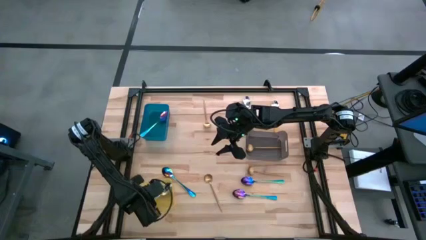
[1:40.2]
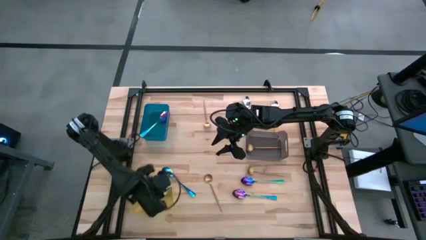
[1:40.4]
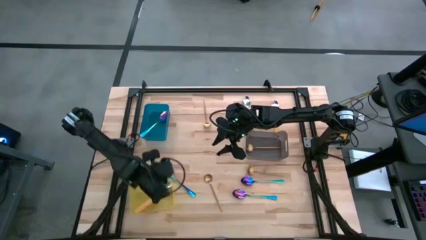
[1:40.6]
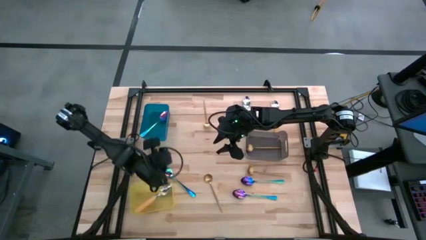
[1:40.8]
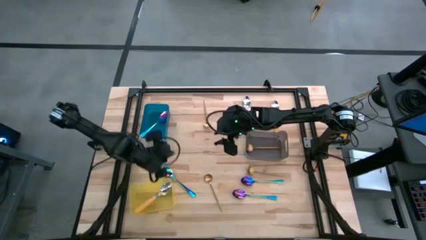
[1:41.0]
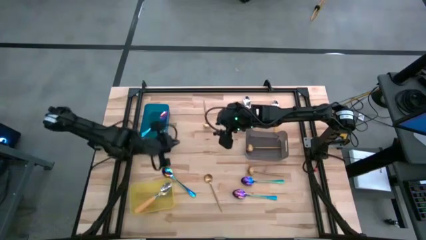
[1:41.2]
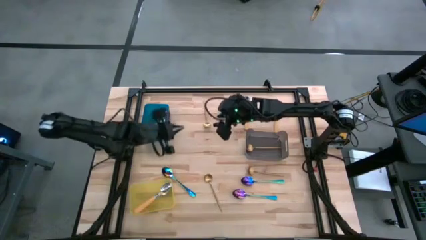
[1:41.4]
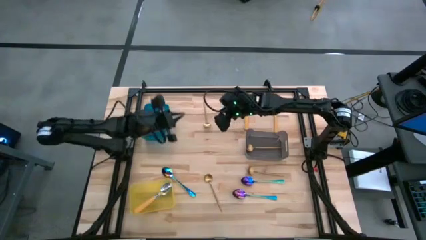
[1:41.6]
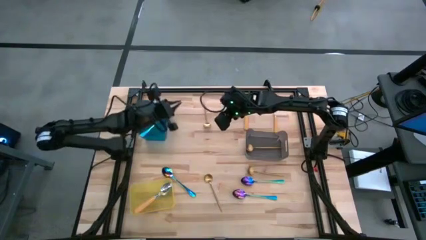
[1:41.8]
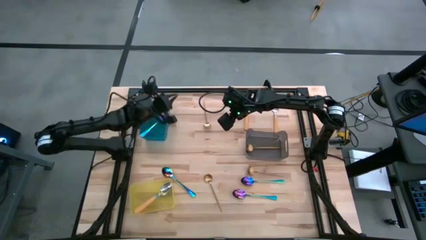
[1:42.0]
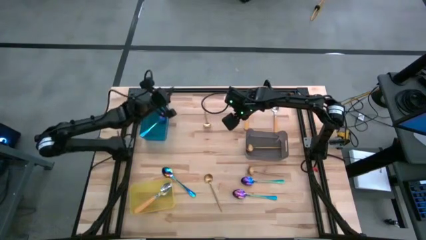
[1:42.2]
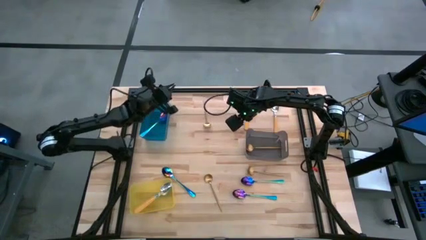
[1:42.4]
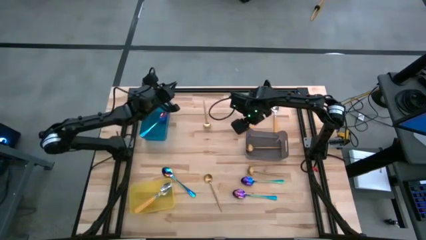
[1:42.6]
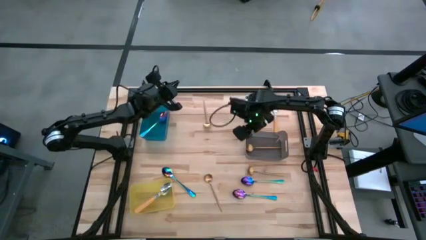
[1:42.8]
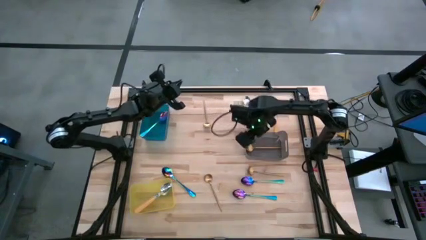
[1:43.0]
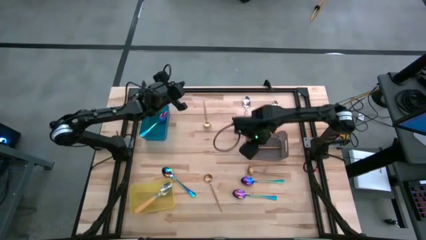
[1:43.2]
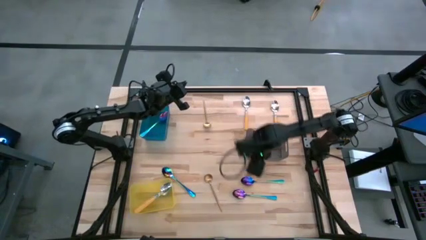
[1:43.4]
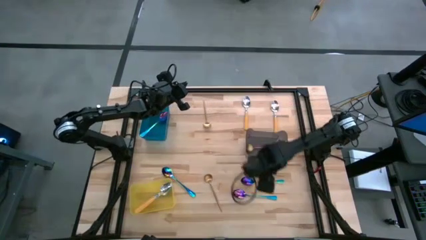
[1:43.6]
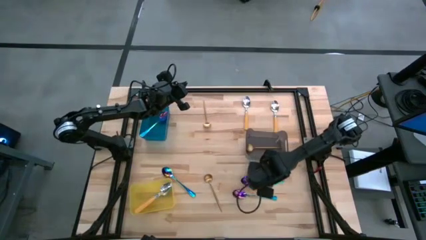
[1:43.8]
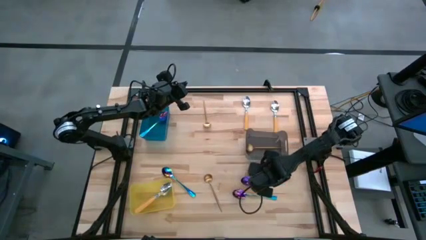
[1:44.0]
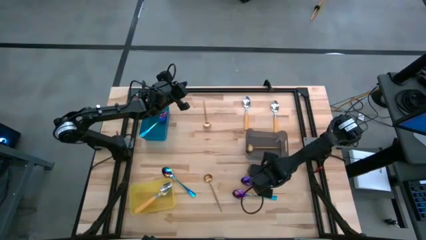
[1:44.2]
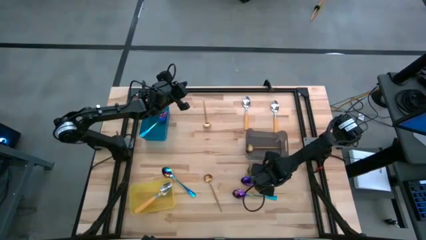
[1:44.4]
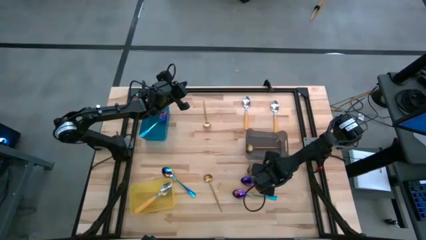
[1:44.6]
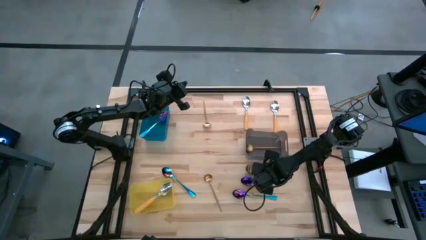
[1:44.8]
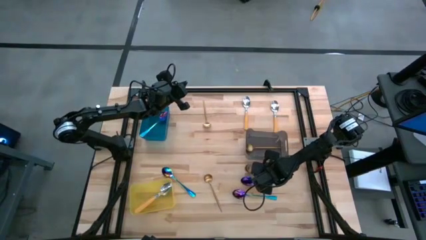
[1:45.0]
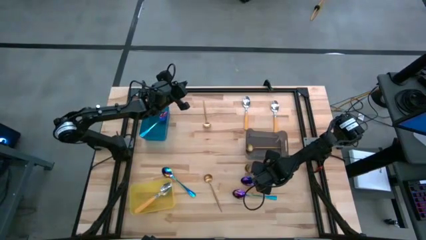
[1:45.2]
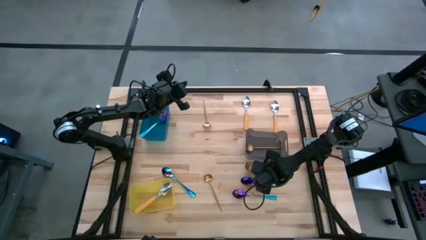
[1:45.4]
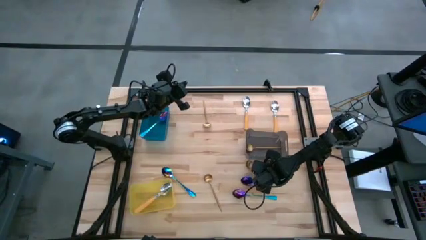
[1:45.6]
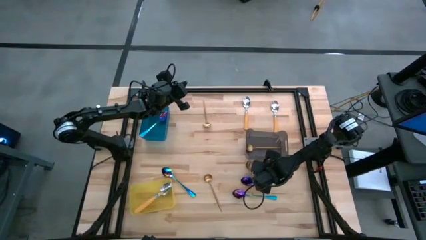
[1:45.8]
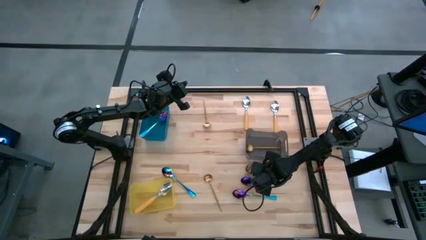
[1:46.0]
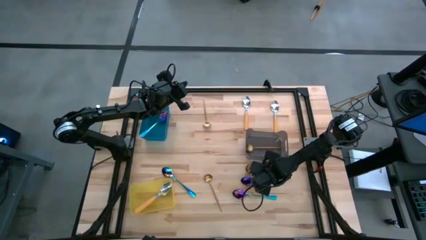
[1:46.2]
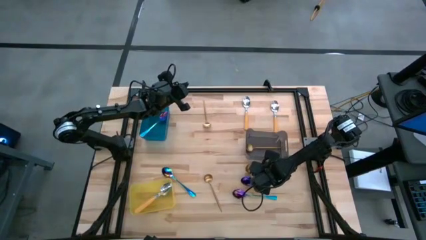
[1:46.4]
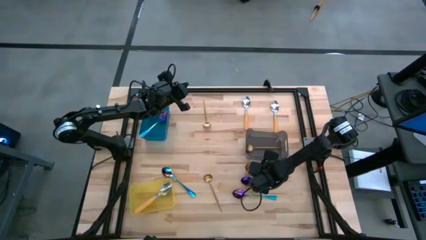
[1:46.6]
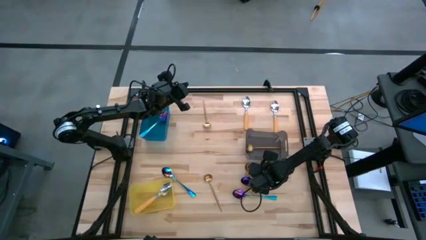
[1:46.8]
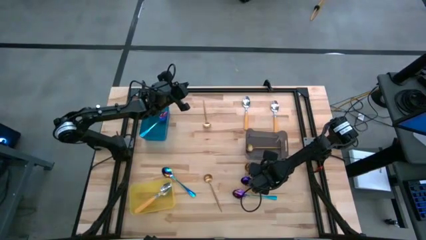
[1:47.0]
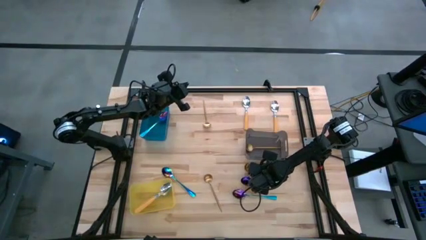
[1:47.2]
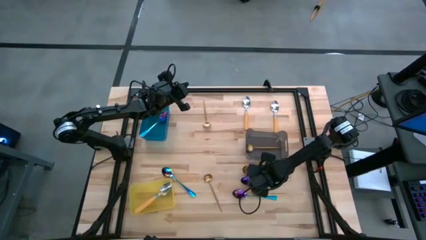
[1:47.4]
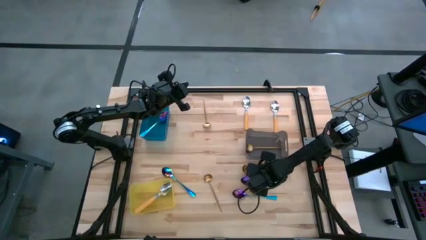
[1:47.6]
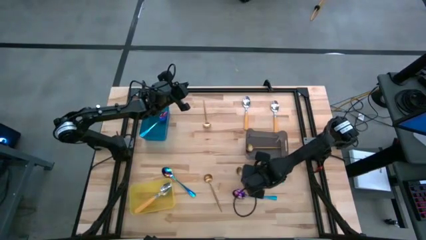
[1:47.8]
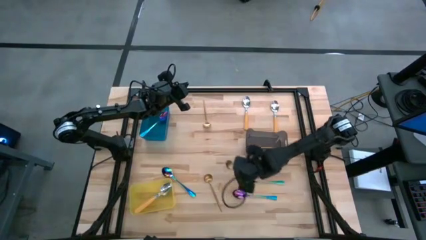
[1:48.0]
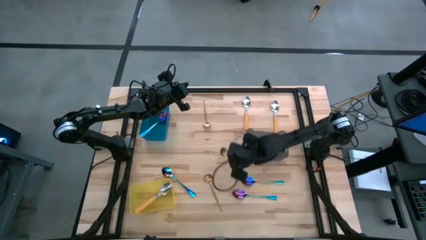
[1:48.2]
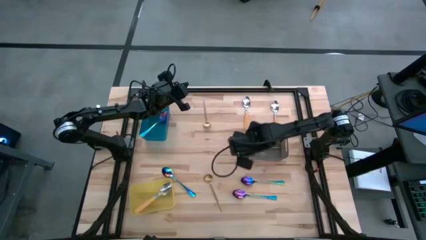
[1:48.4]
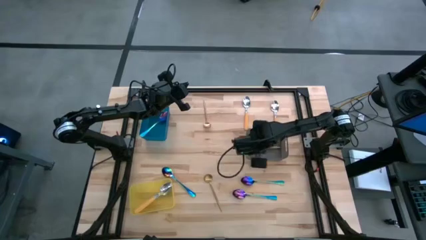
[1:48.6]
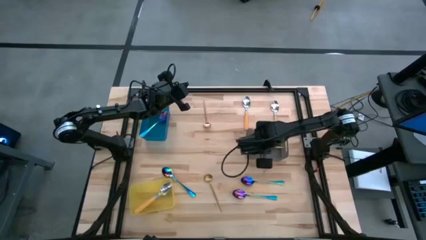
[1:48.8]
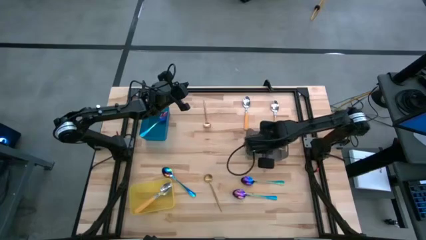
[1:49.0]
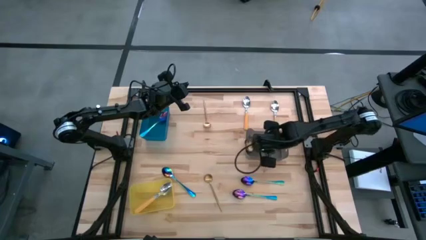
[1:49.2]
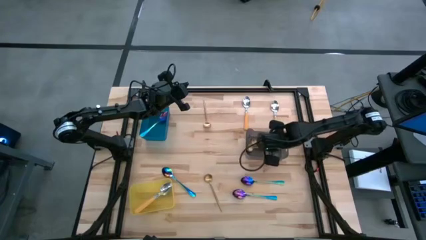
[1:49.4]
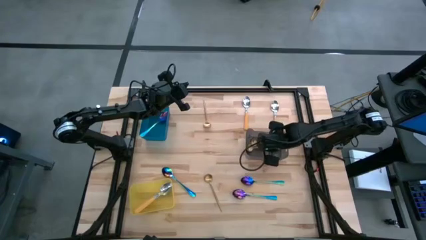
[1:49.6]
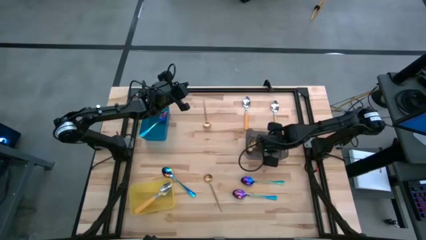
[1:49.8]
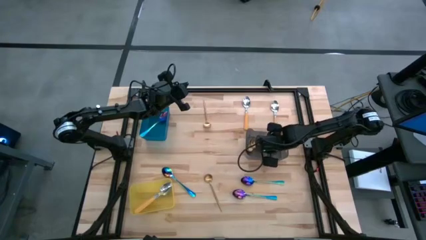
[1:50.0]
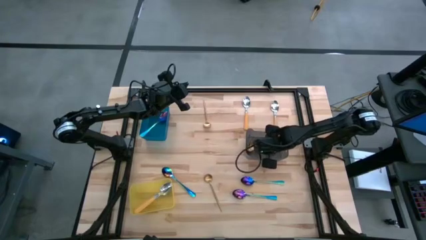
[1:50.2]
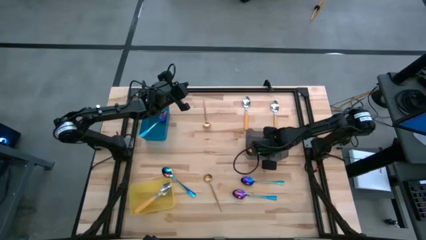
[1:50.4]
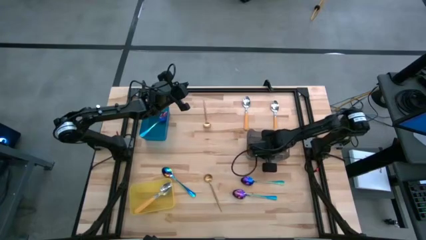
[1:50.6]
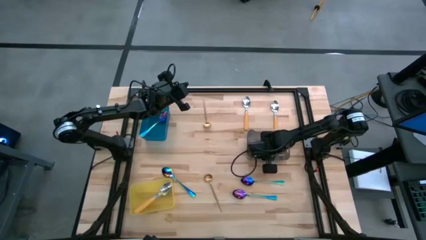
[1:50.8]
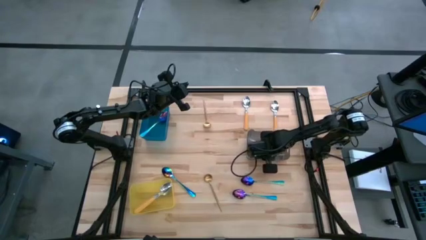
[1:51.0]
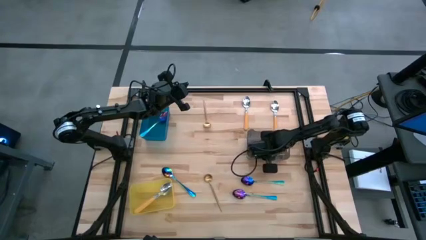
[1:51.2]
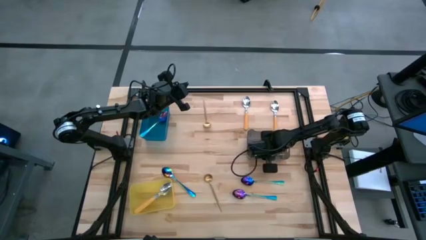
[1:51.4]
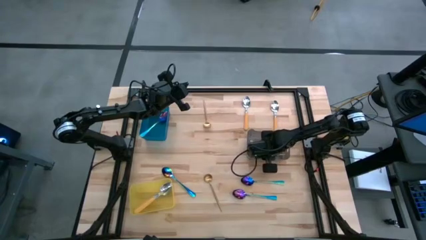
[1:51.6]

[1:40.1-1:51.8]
Task: Sort silverware by color (type)
Put the gold spoon into the black bin

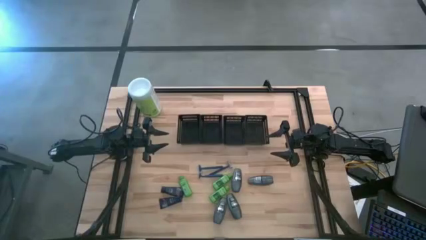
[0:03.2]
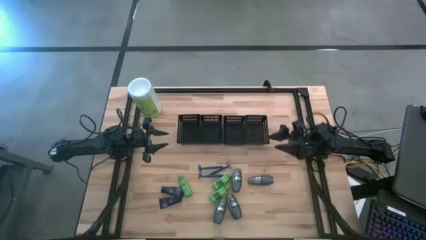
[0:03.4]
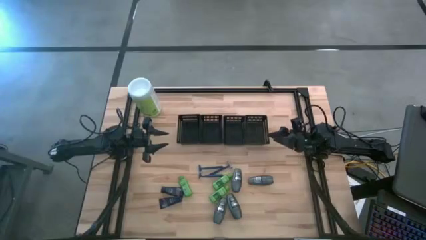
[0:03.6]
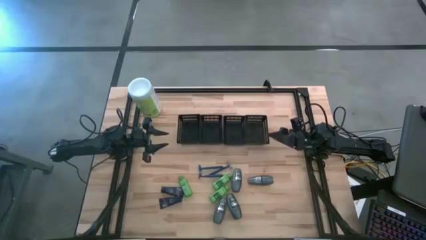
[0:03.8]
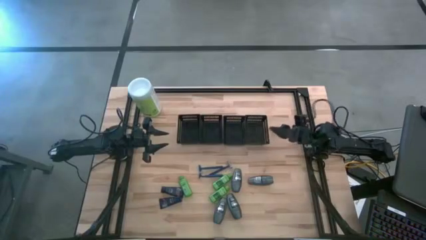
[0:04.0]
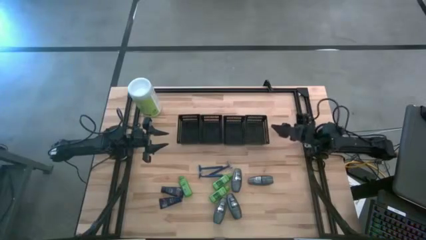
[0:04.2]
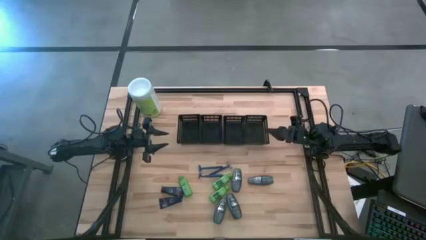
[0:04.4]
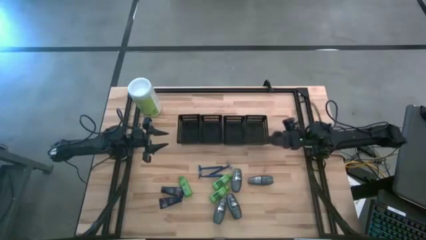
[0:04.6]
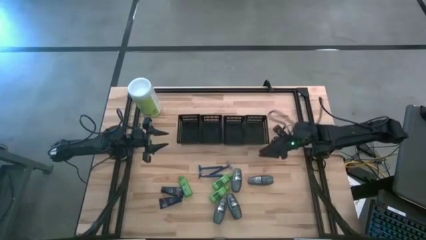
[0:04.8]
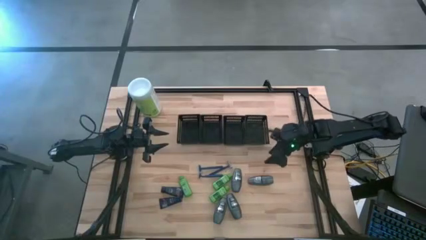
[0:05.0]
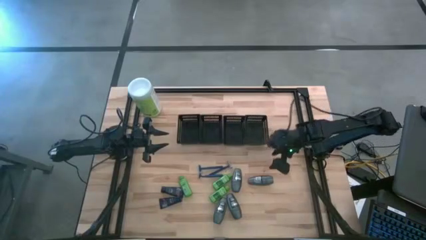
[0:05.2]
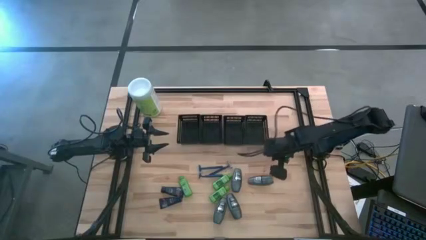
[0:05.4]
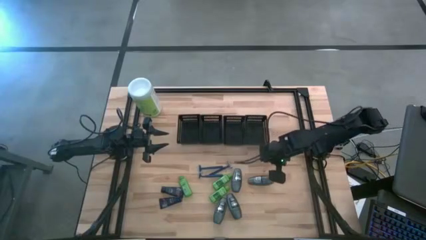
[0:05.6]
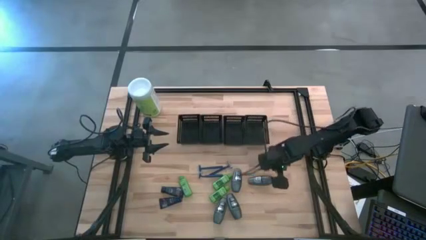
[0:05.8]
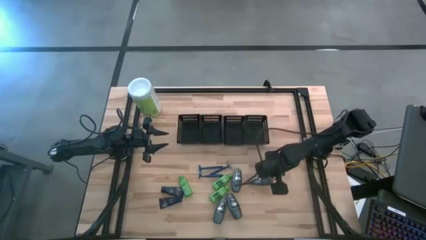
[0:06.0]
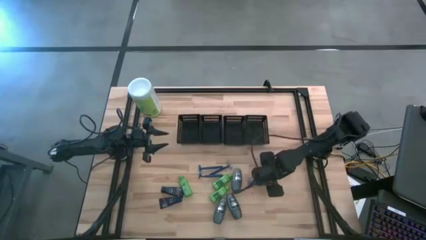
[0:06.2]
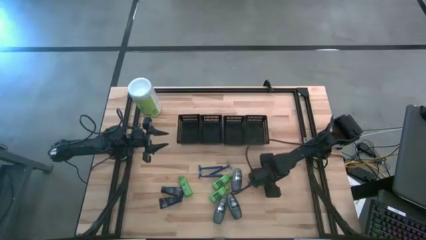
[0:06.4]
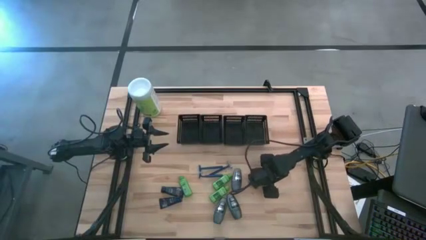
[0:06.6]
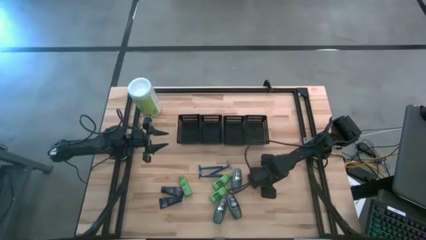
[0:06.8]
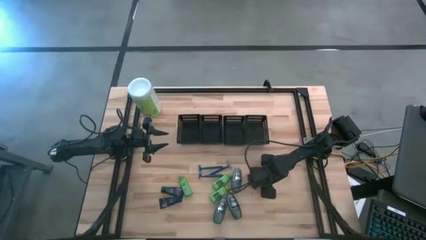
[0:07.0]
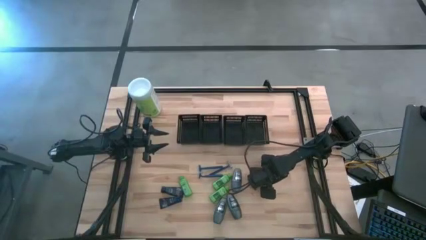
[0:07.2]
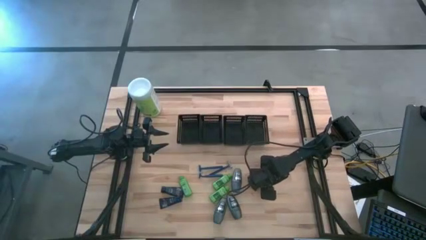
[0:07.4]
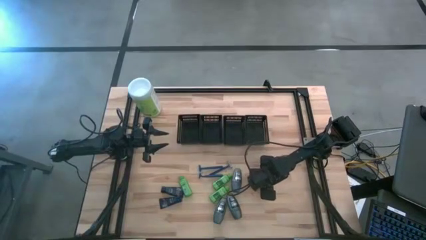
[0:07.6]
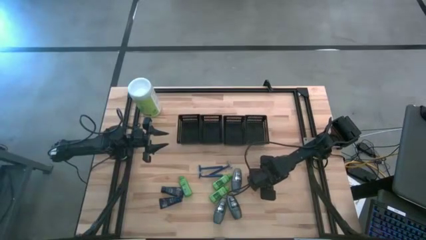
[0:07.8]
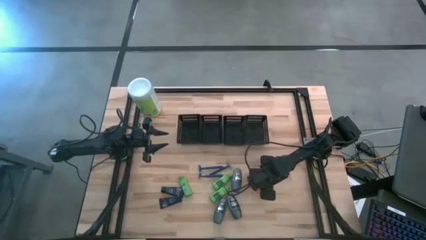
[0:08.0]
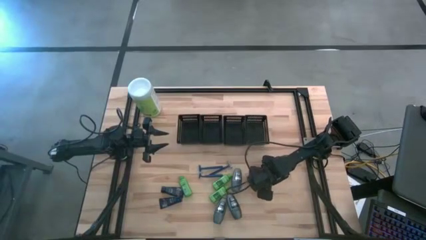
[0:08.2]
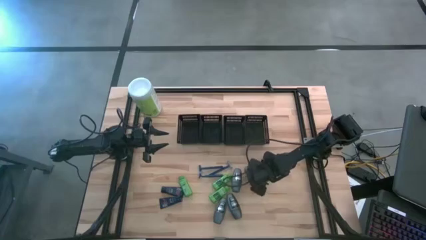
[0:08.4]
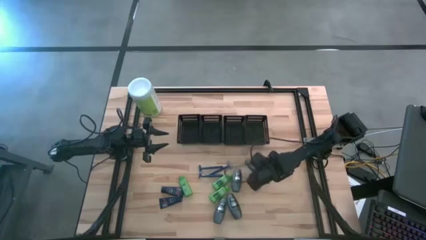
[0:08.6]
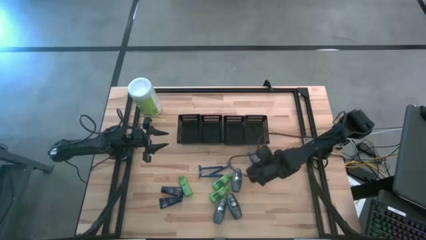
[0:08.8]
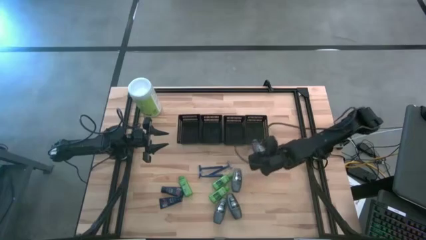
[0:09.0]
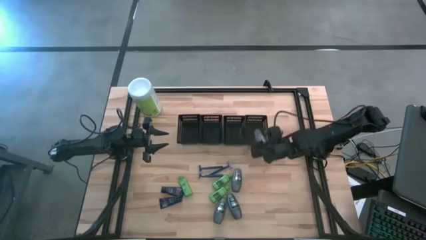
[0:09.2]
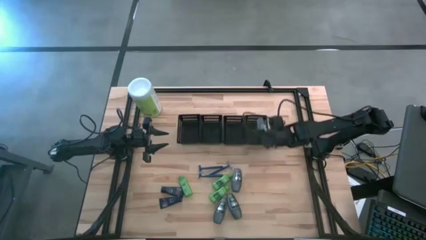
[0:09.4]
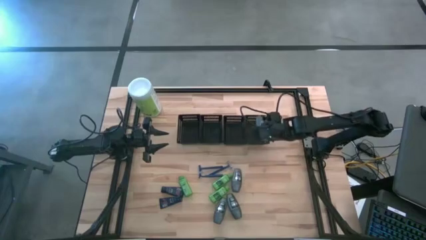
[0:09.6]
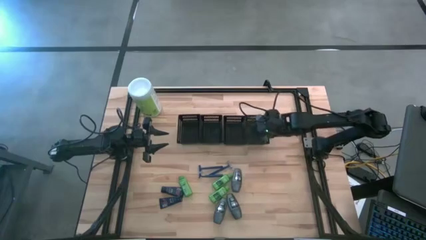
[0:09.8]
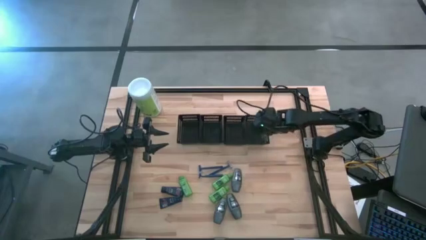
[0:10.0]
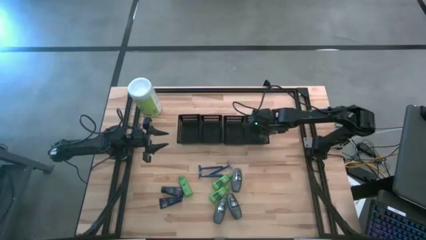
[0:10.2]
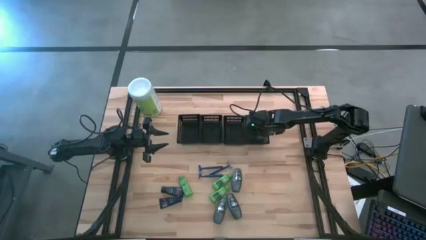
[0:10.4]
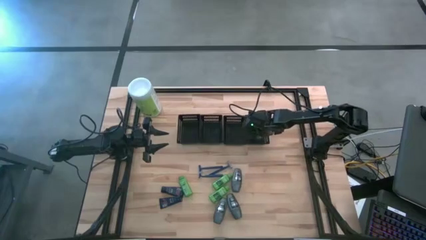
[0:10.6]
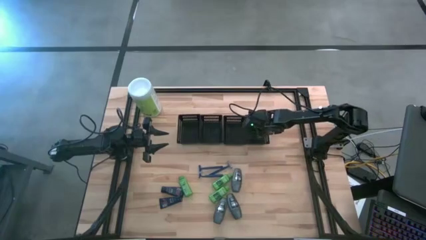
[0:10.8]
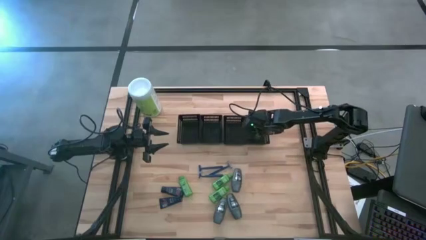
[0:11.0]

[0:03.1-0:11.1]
Task: Pick & Place Travel size toiletries
Put the gray deodorant into the right black bin
